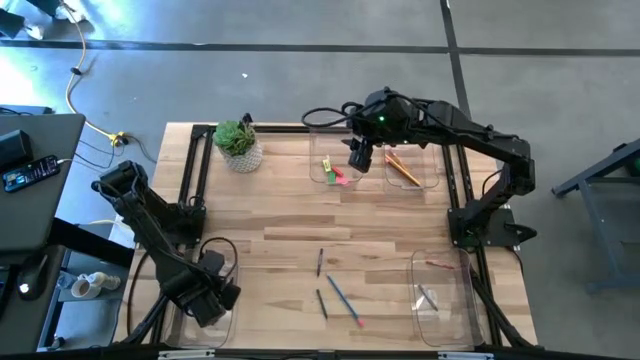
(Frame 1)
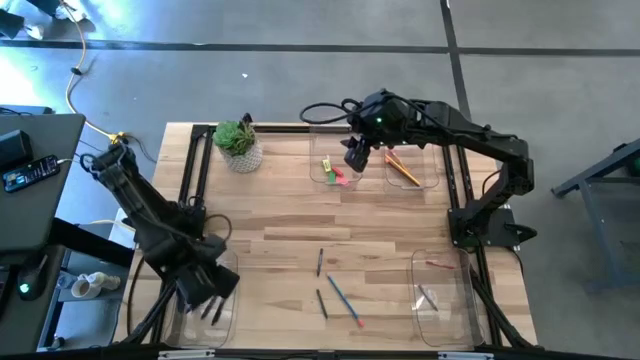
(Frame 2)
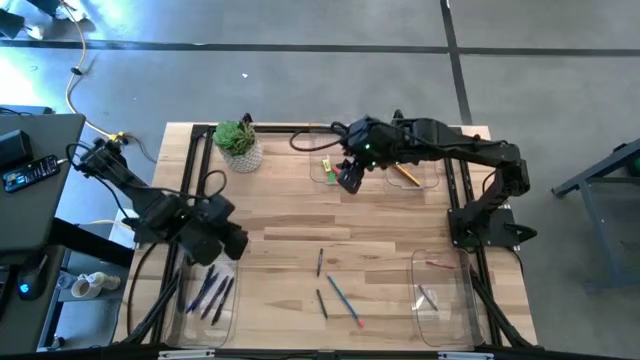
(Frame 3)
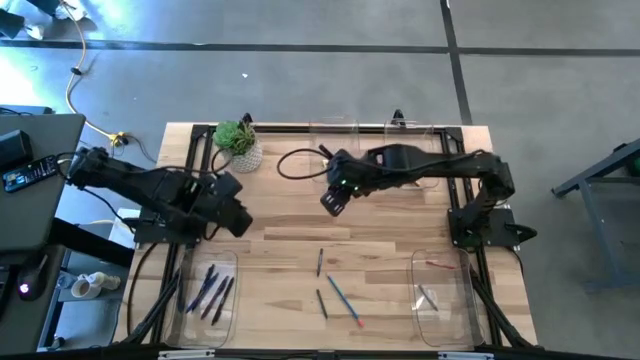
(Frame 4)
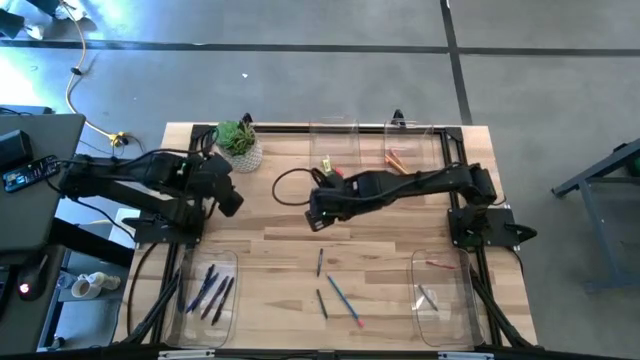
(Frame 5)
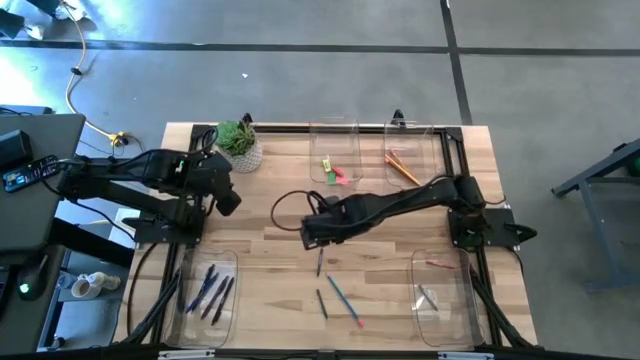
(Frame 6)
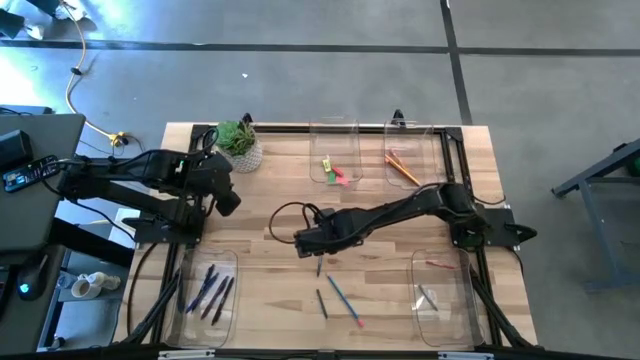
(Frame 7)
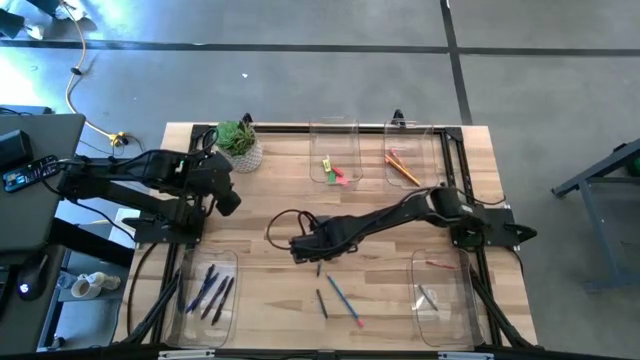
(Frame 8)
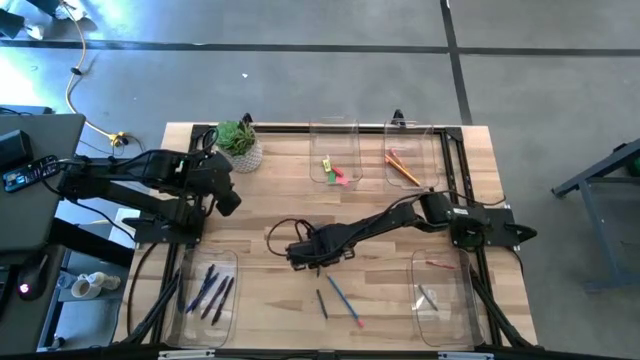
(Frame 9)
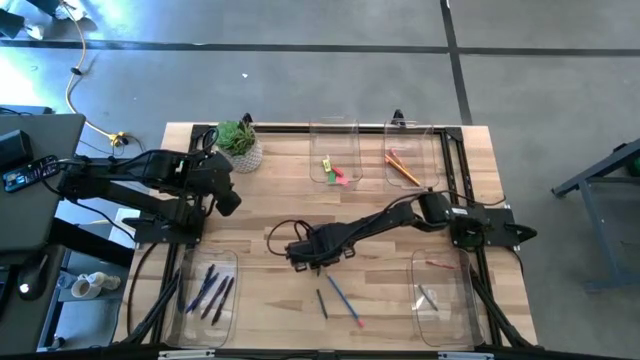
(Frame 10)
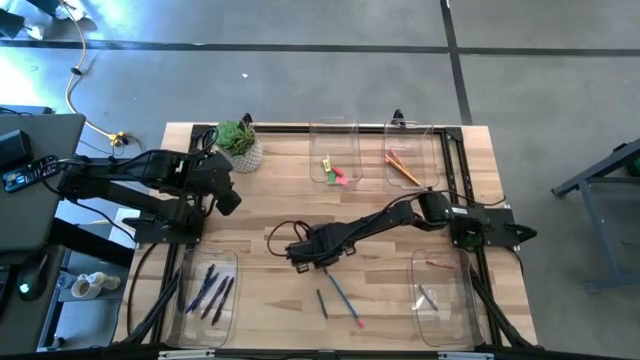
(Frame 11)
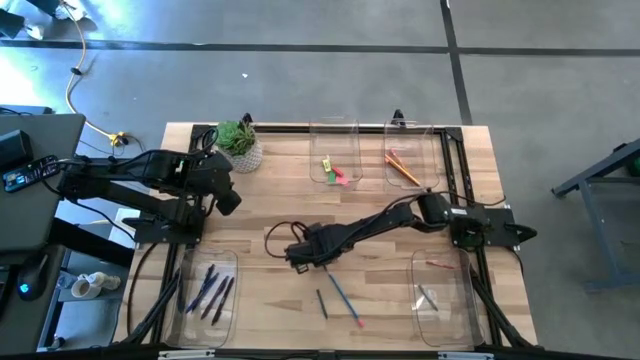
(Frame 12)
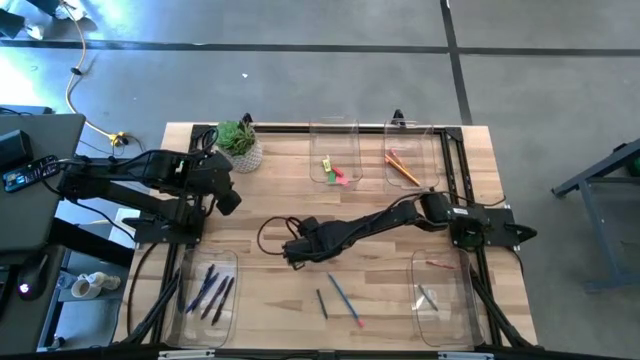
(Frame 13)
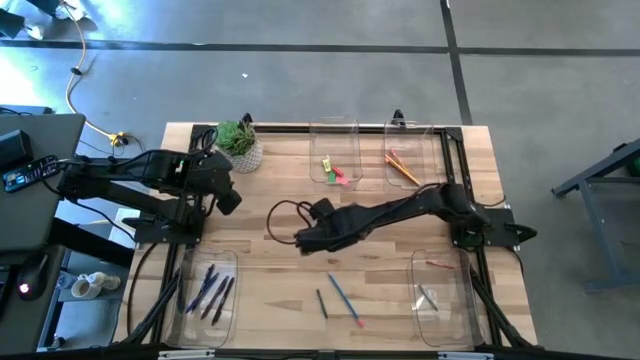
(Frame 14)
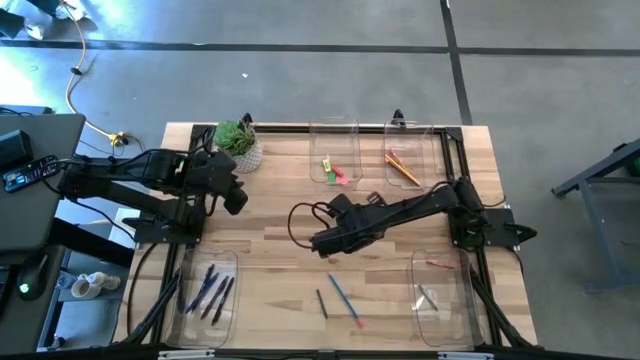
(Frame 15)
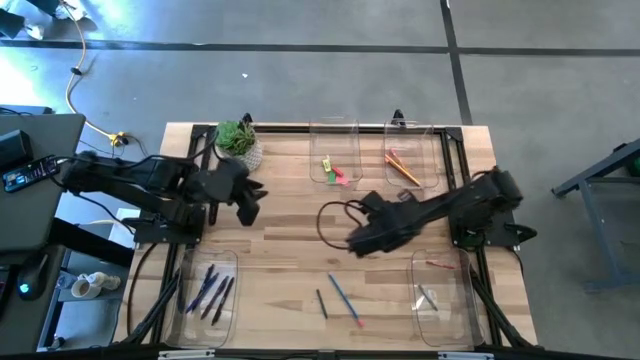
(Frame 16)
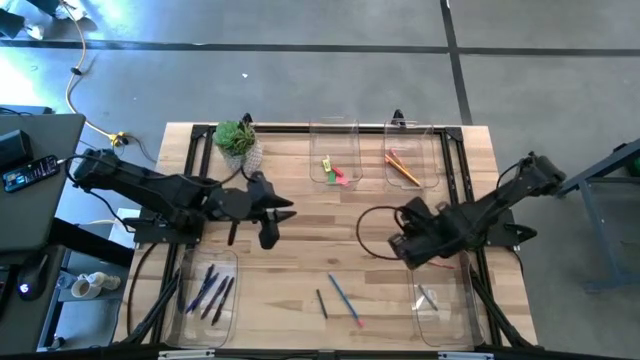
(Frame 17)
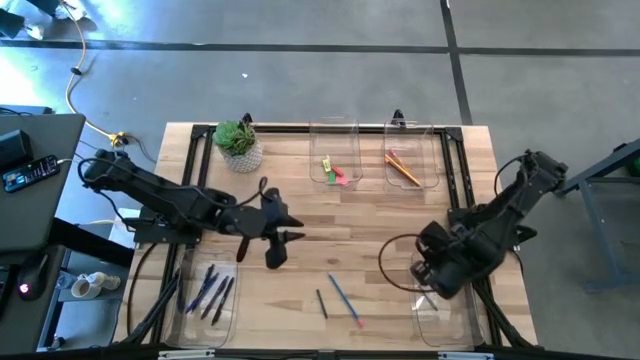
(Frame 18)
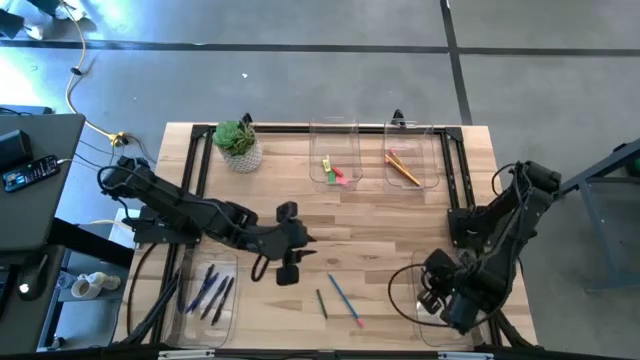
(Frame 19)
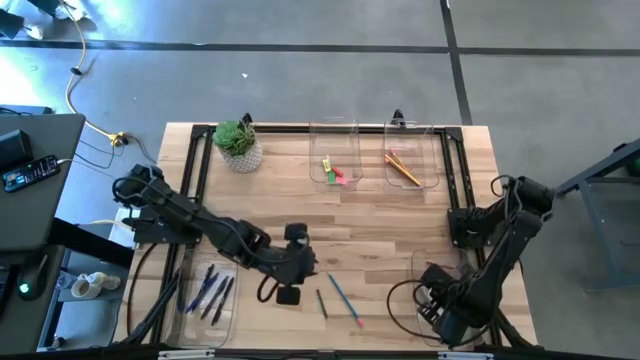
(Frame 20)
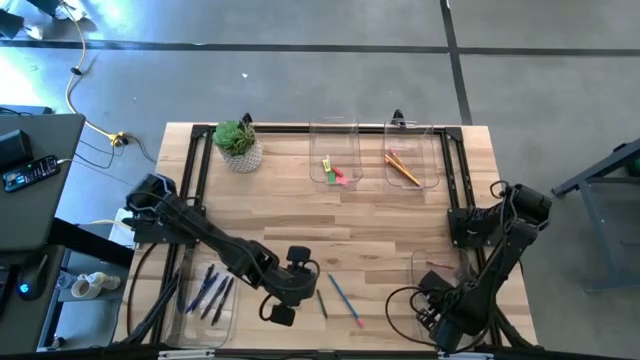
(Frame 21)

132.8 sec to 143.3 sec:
Task: Sort crayons/erasers/pens/pencils in bins
Put the blue crayon into the bottom right transparent bin

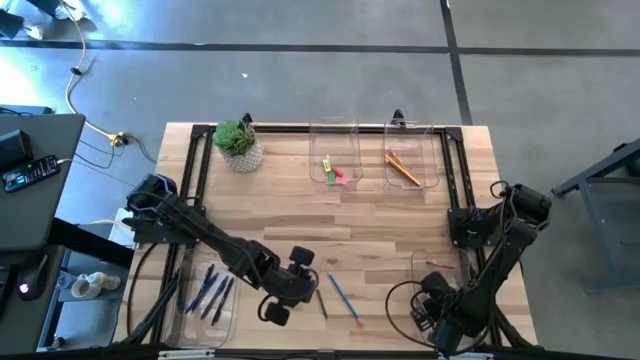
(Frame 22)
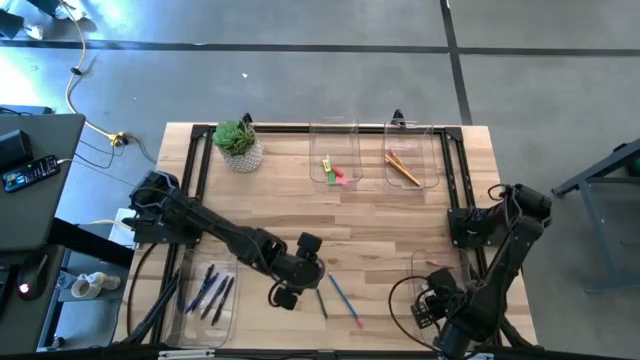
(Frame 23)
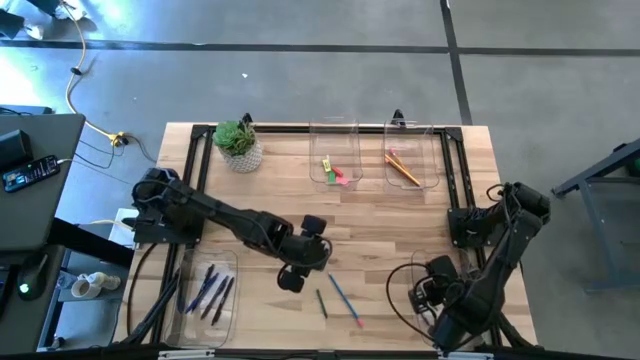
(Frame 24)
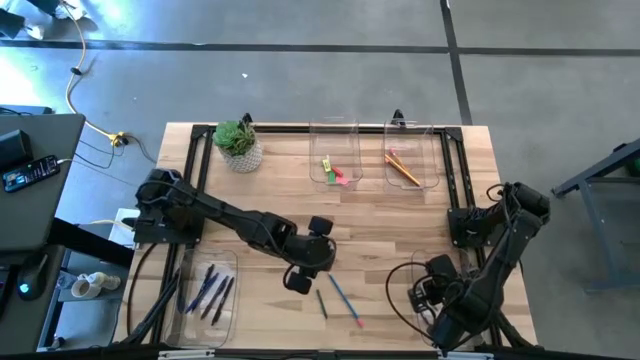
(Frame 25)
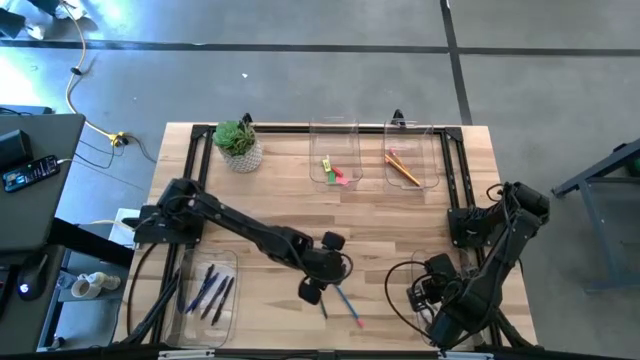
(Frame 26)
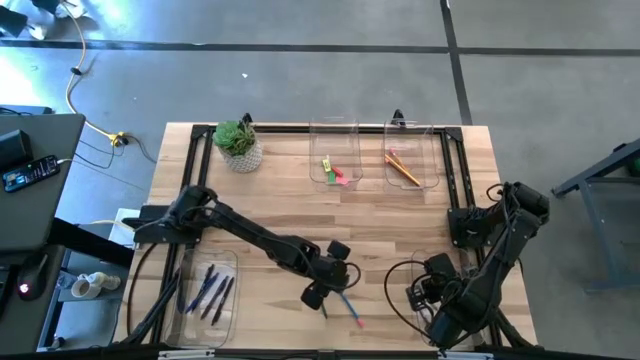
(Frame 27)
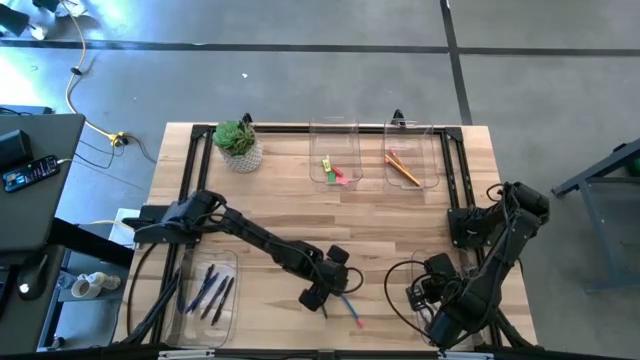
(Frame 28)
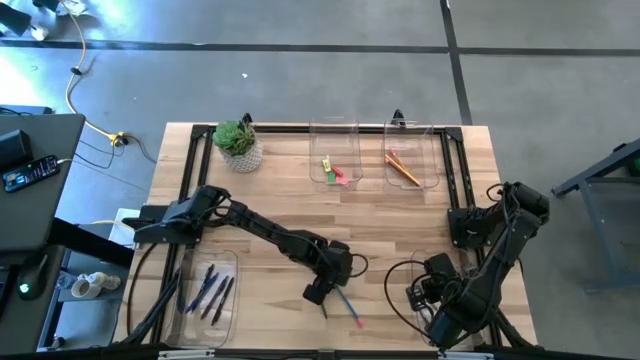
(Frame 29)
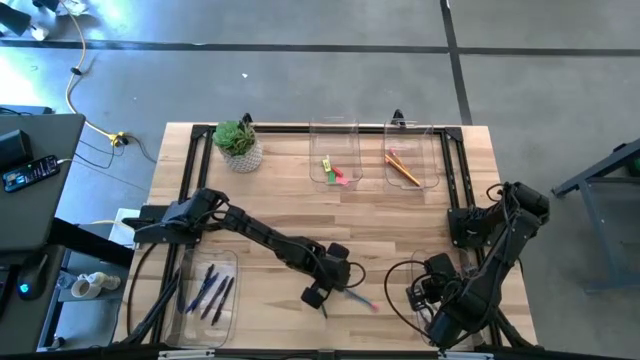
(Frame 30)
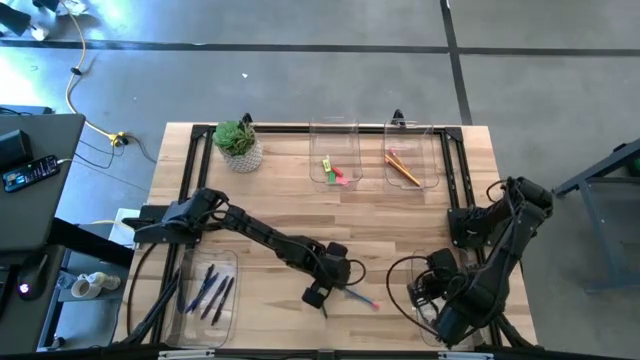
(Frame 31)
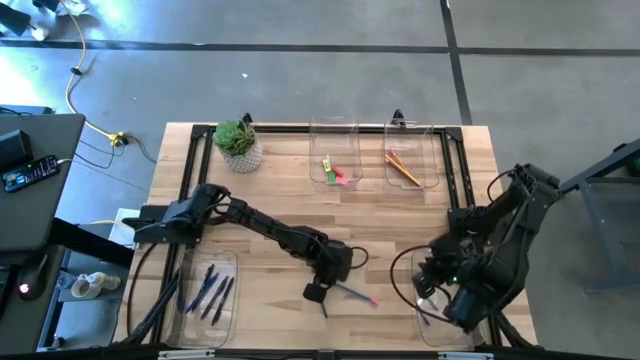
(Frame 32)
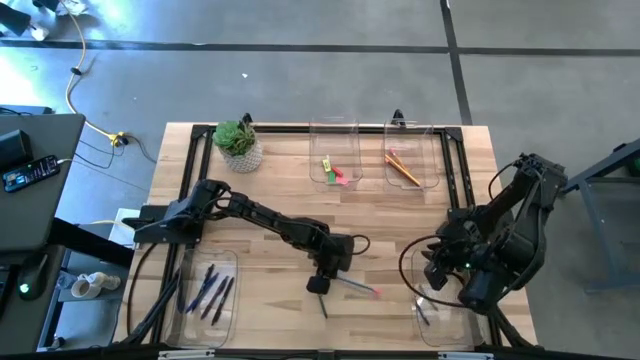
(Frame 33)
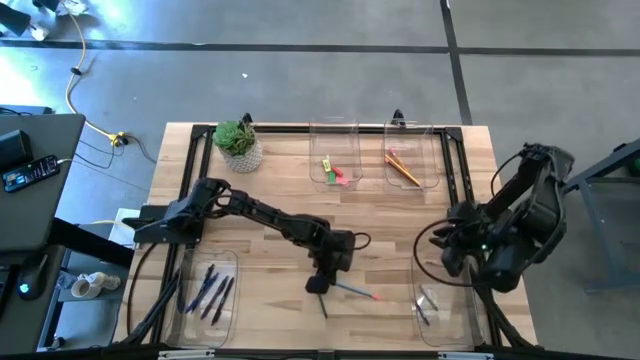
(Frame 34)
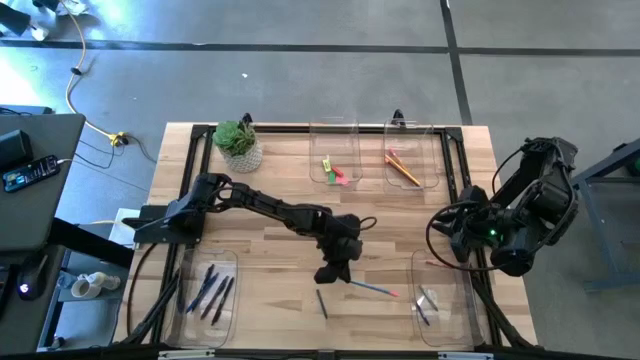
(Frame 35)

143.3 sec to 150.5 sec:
Put the blue pencil into the top right transparent bin

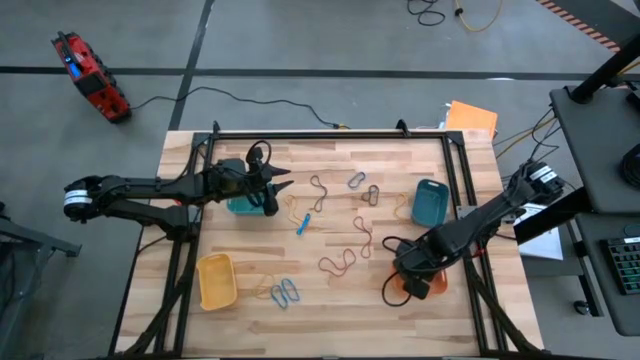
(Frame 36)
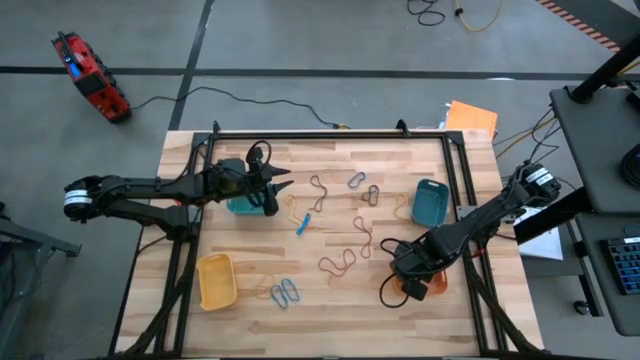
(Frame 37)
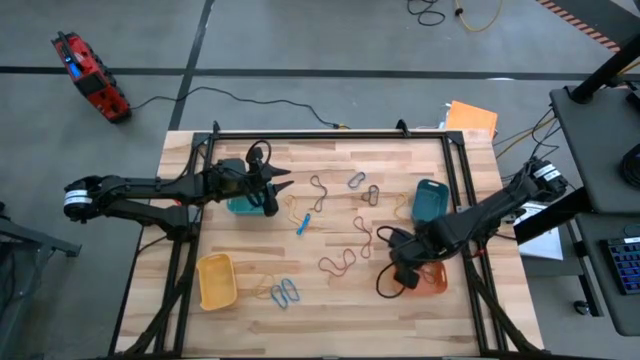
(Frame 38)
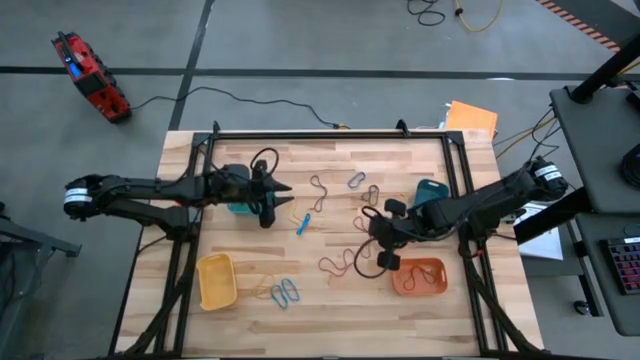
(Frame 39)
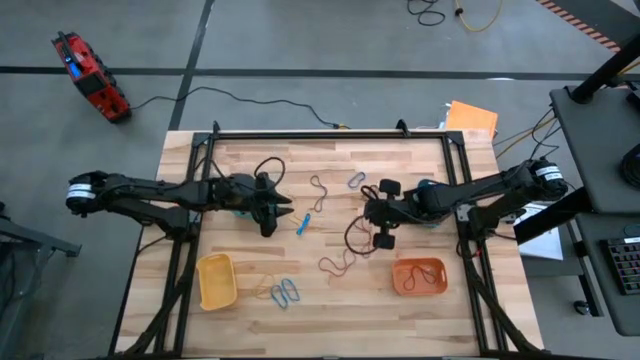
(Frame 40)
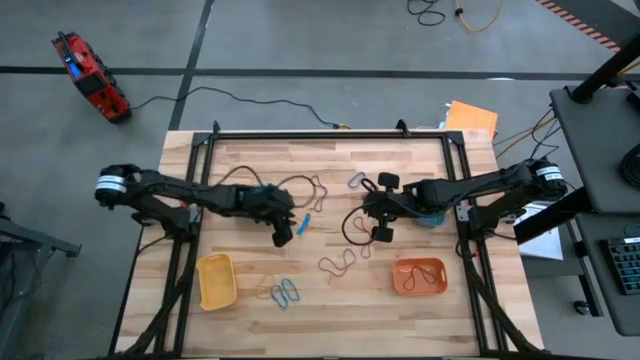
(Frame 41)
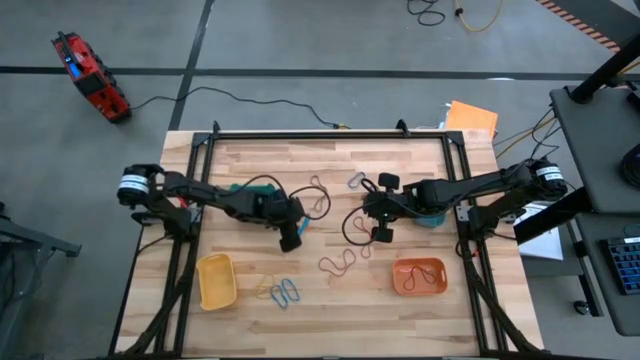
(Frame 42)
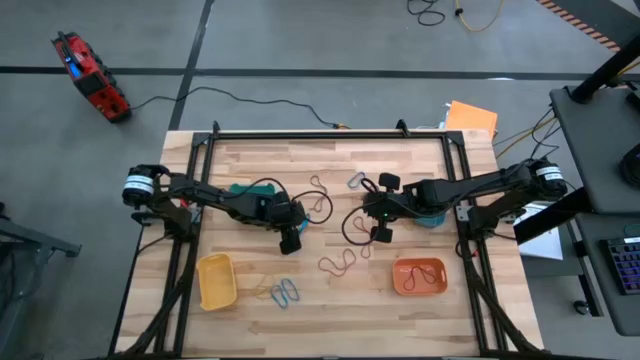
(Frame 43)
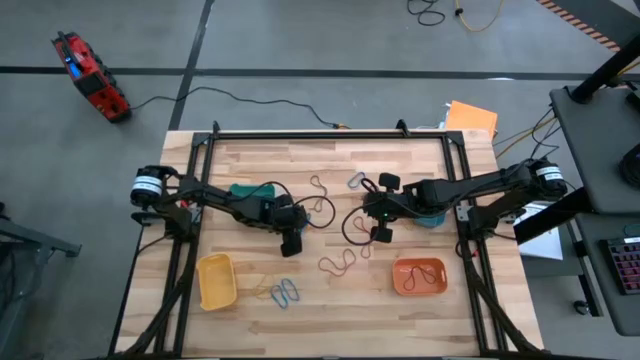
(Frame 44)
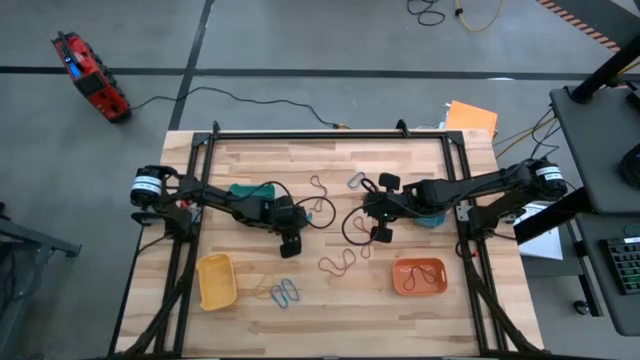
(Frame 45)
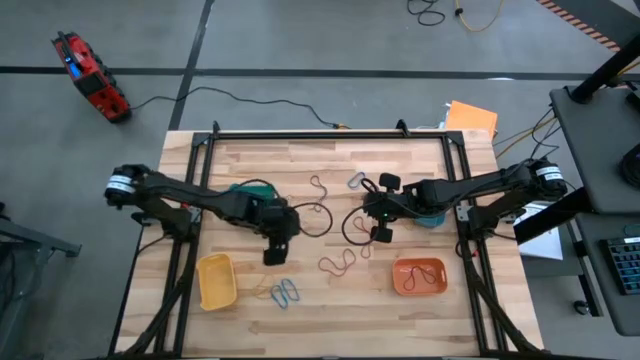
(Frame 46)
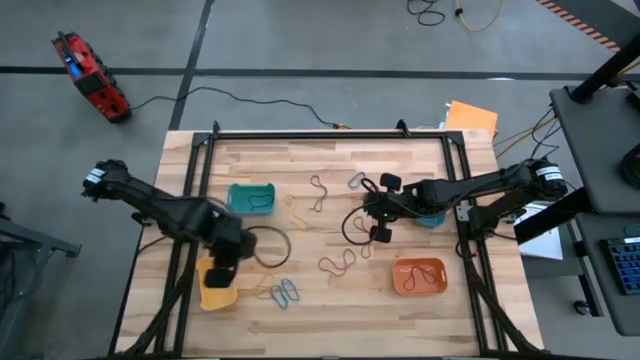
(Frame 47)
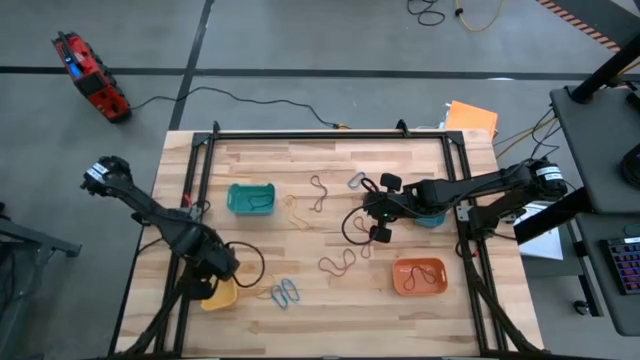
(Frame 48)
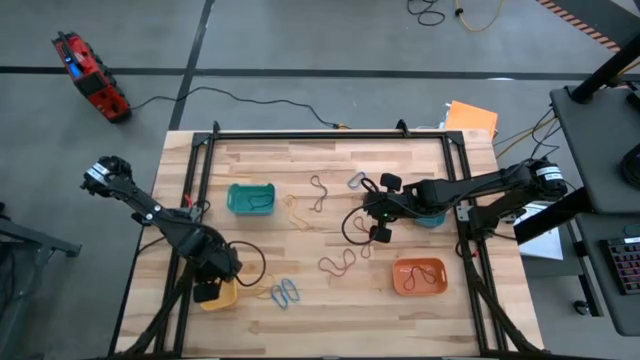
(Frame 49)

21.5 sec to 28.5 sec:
Task: Sort rubber bands into baskets
Put the blue rubber band into the yellow bin
